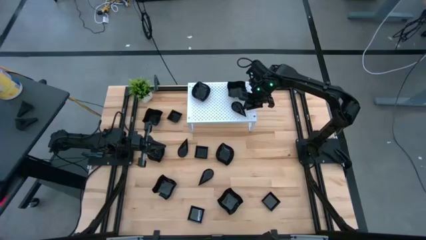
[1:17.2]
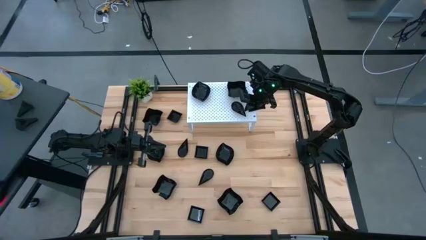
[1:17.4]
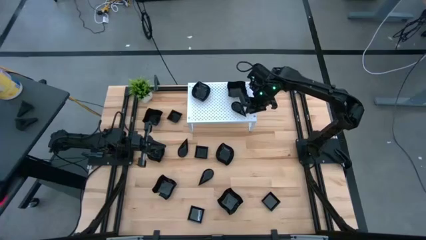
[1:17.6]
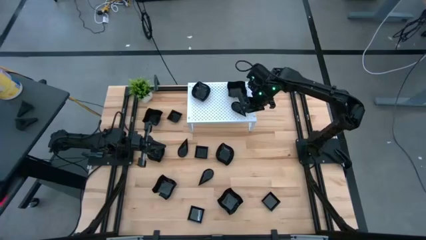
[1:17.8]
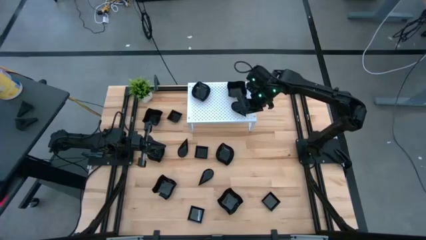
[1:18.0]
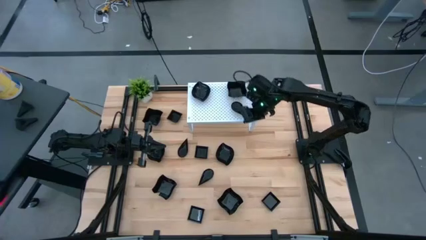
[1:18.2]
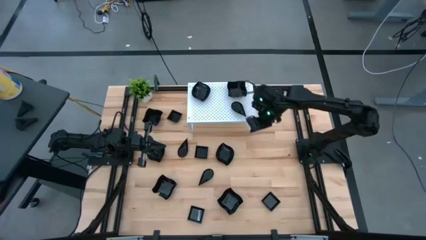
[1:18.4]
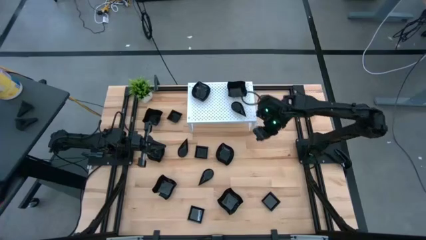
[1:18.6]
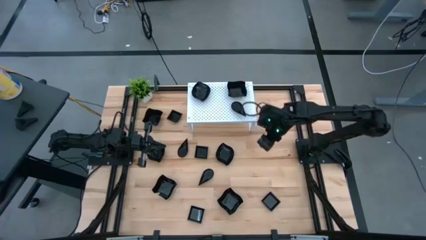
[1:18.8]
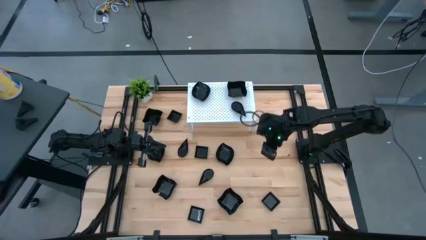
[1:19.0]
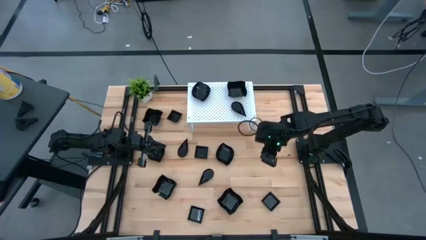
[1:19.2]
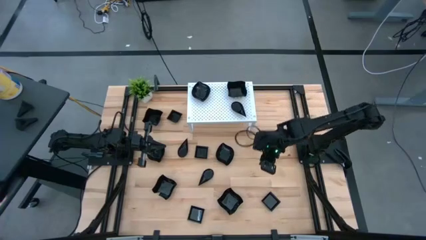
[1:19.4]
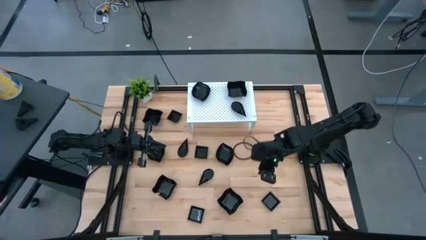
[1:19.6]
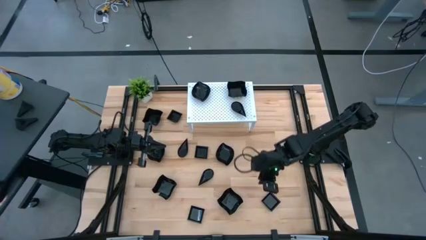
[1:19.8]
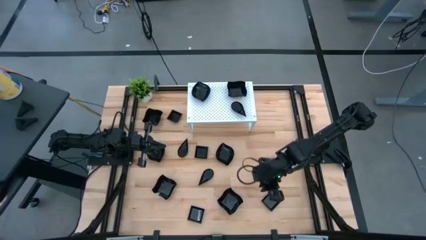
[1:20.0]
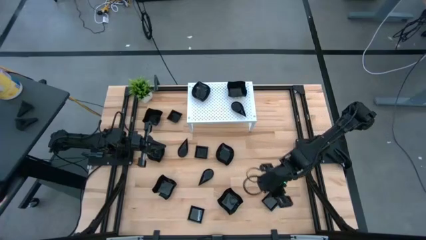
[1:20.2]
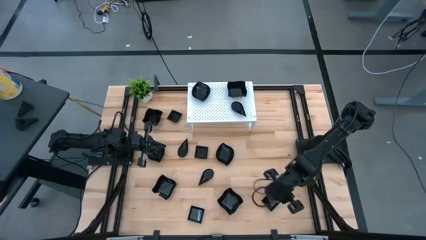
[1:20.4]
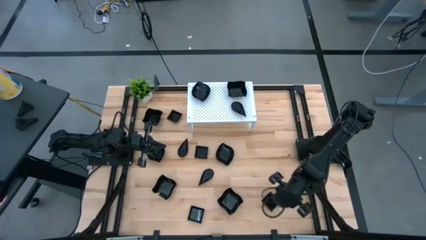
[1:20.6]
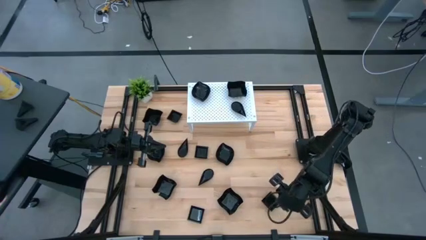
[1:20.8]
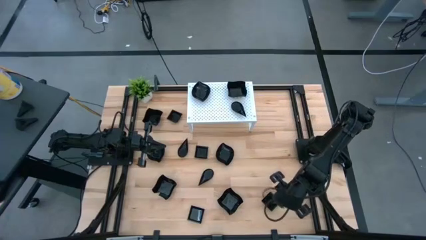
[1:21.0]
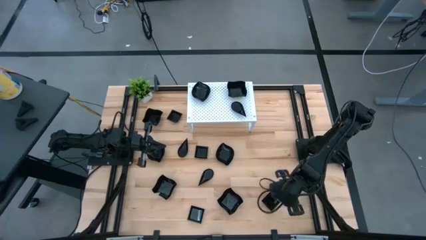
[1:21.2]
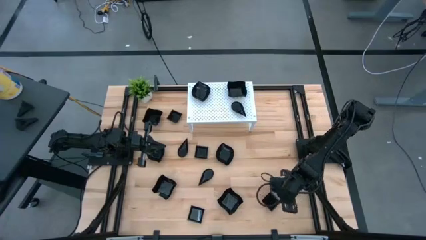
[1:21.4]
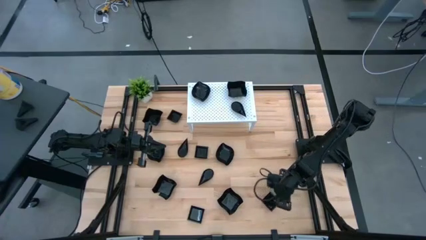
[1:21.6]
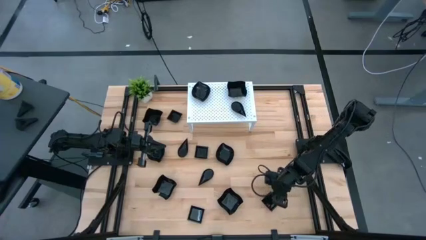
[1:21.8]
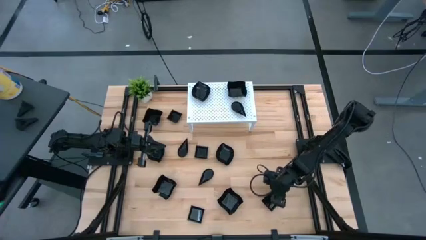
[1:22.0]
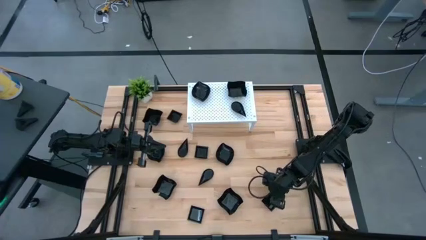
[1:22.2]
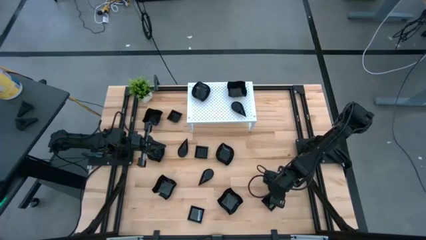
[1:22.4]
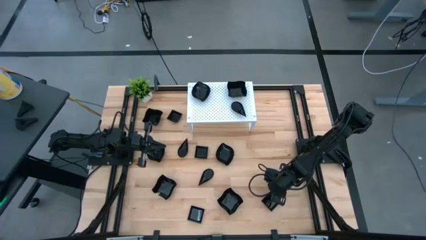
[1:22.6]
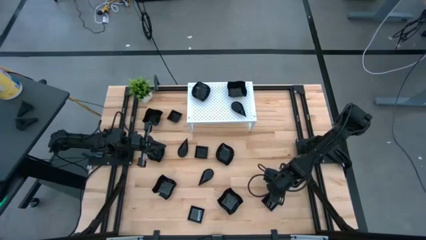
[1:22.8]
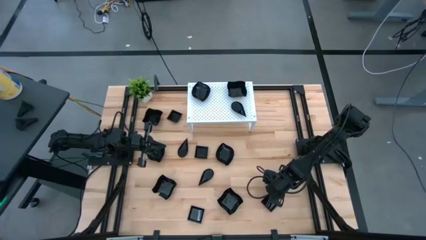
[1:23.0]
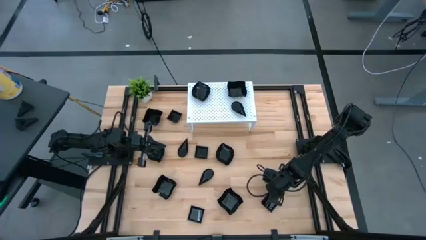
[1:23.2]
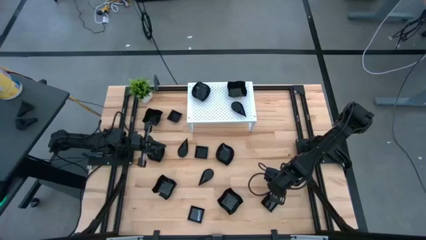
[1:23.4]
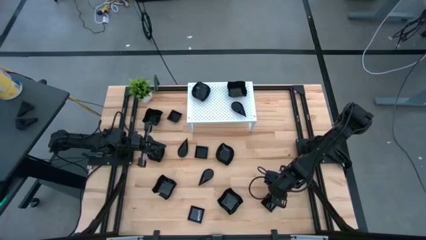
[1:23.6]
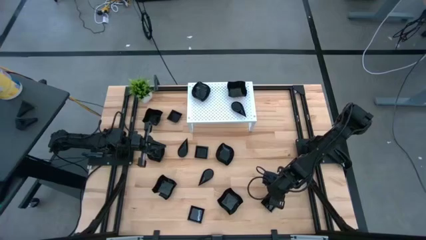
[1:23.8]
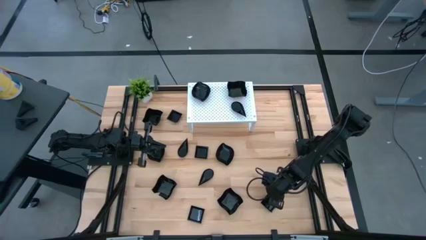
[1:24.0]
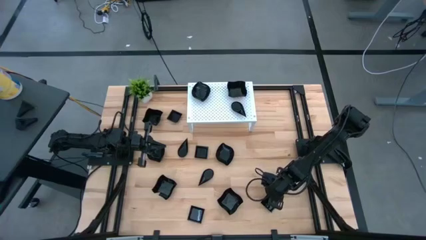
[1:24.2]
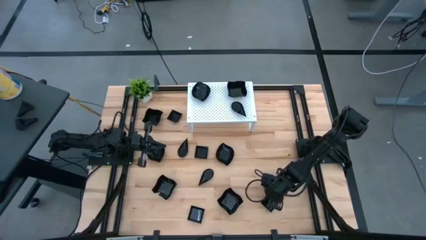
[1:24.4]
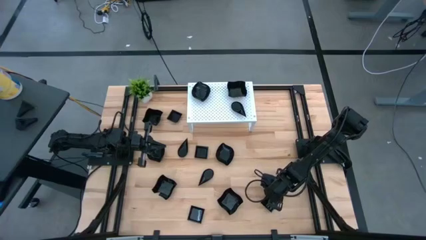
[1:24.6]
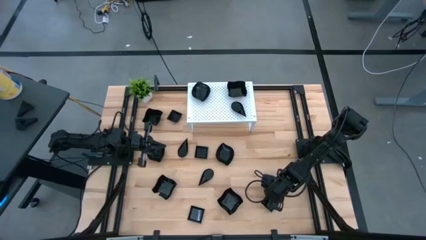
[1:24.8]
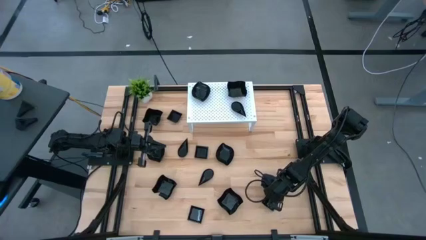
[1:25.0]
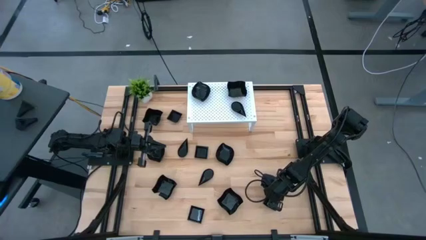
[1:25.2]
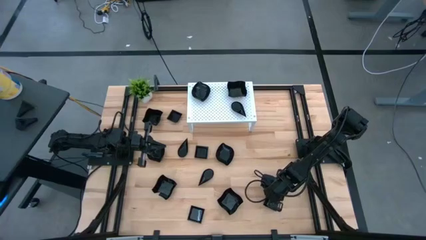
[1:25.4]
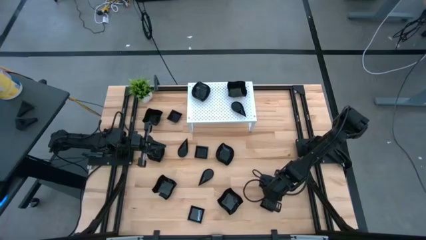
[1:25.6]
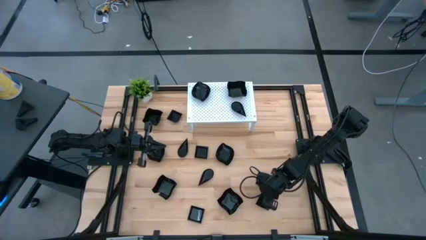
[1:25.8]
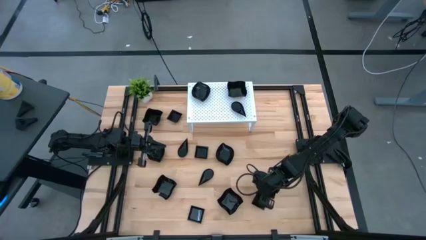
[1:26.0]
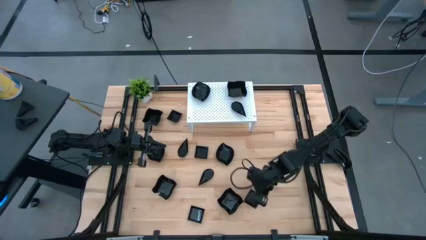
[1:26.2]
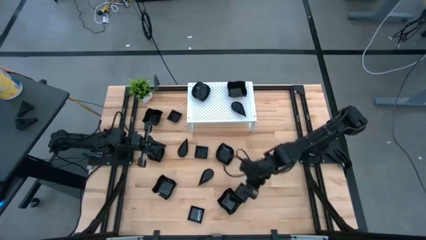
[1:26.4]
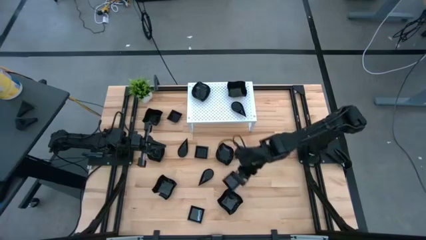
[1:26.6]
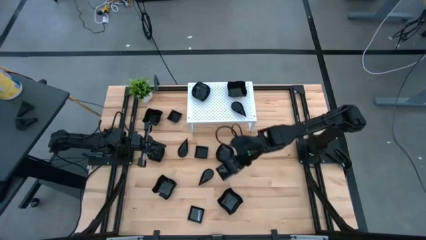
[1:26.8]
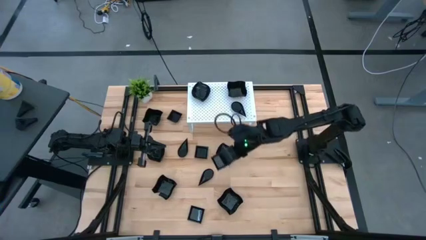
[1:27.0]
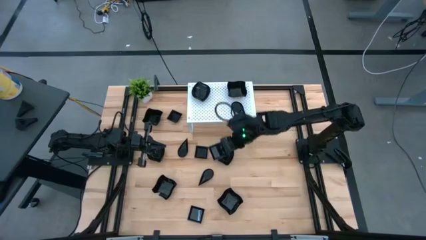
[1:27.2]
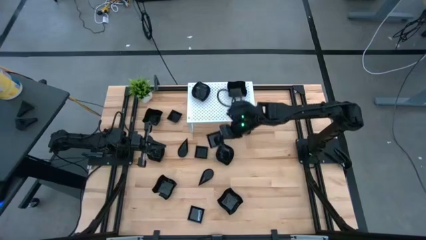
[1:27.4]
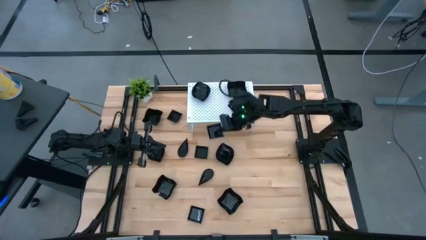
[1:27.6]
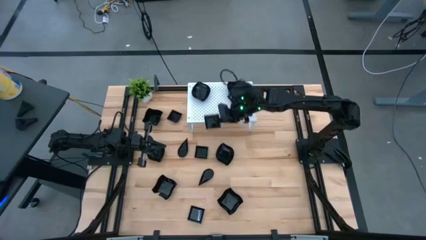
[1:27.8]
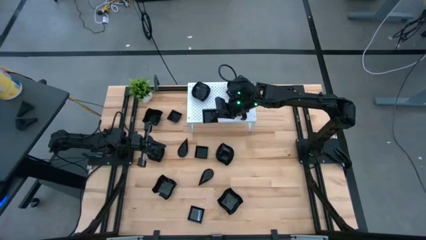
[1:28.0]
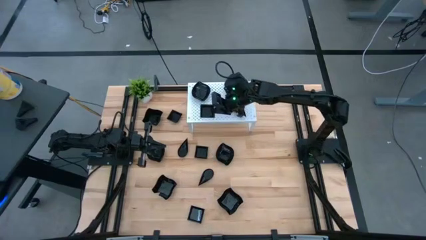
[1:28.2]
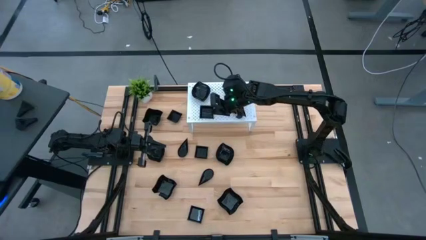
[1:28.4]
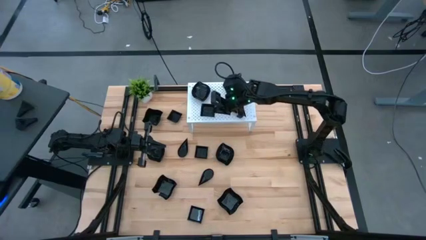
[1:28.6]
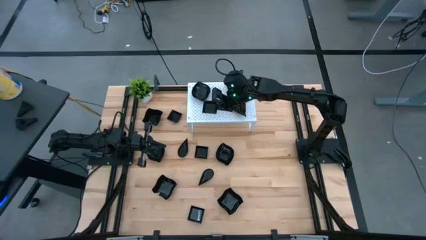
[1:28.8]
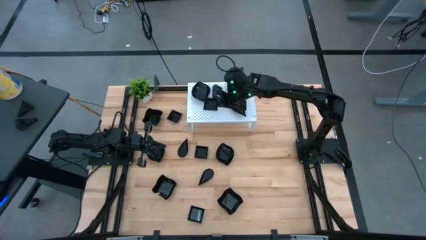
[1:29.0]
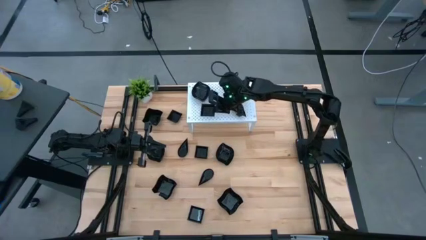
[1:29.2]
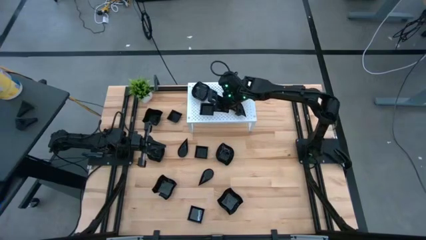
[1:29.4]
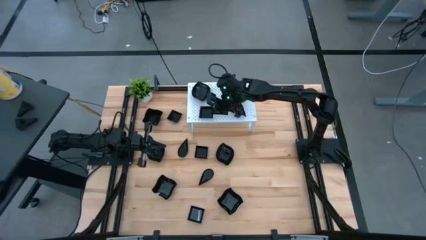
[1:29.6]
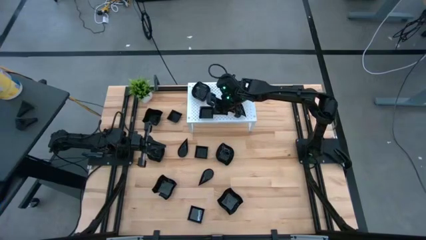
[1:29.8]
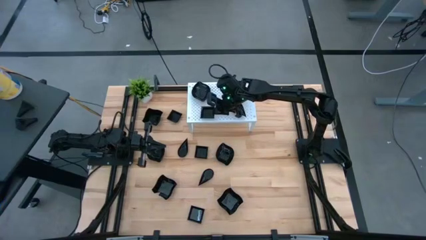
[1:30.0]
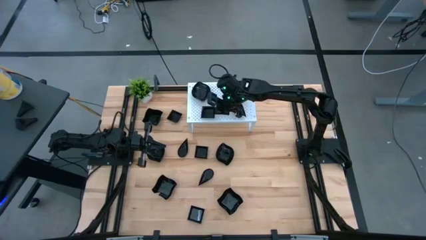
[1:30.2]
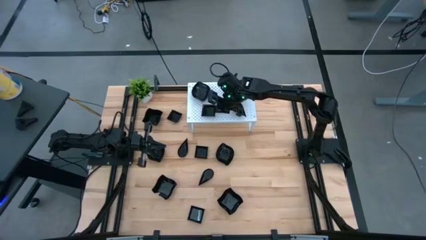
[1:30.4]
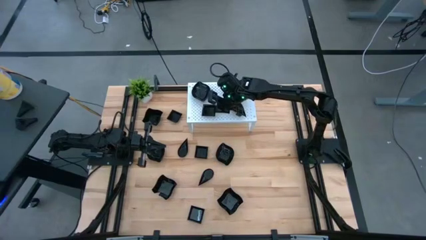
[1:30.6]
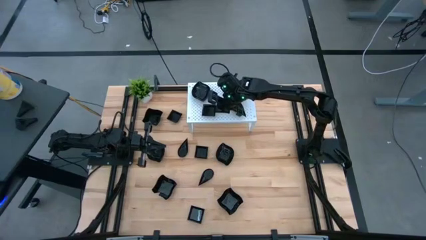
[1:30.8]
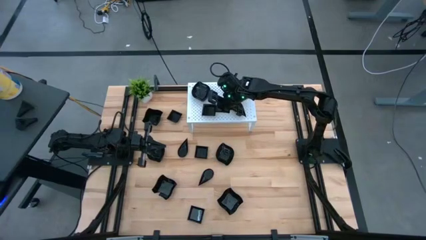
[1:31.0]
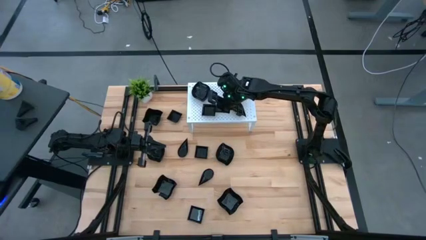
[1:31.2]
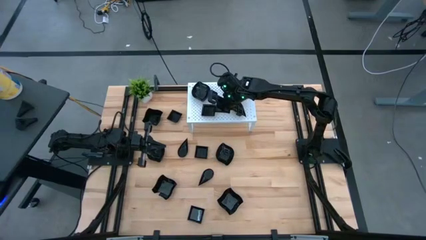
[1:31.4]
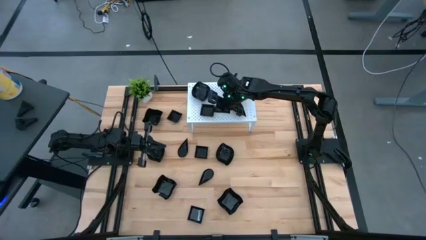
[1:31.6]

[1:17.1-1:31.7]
Task: Pick & Place Mini shaped plates
Put the square plate on the shelf
